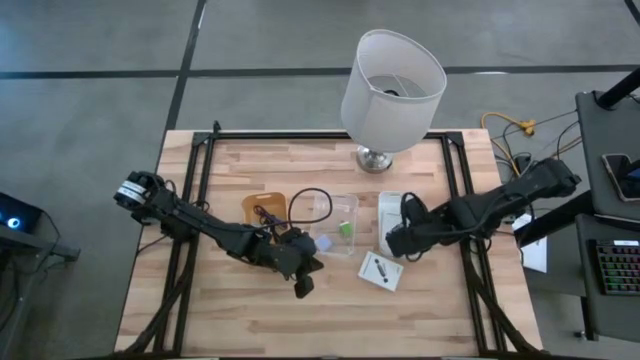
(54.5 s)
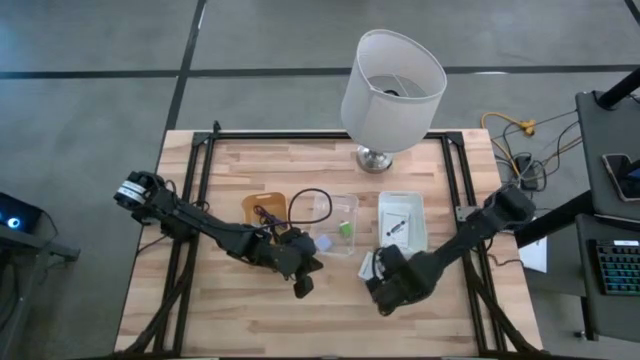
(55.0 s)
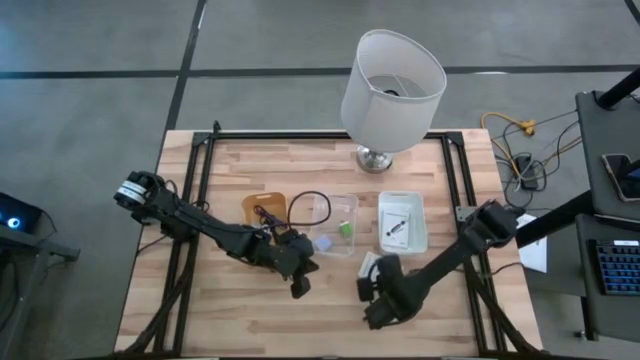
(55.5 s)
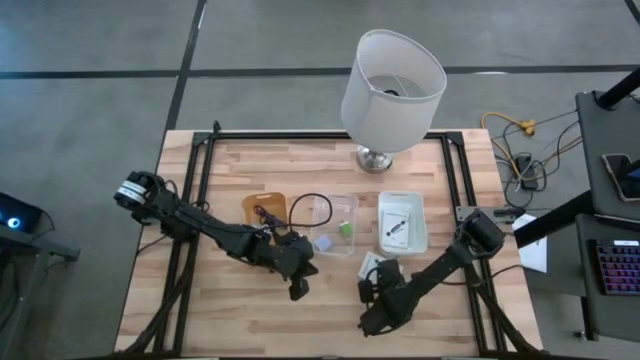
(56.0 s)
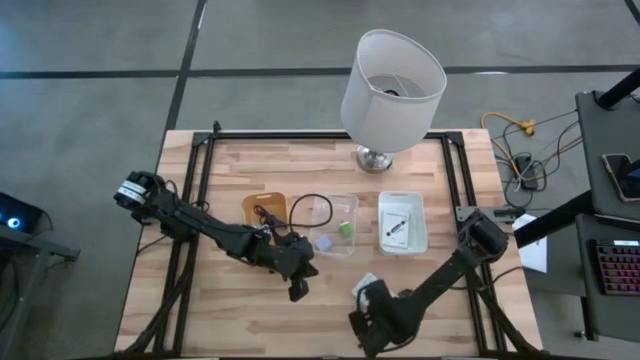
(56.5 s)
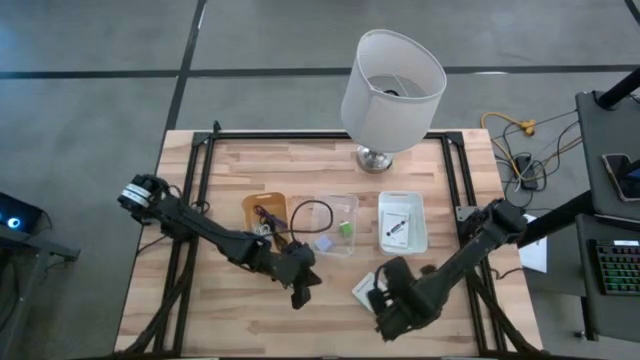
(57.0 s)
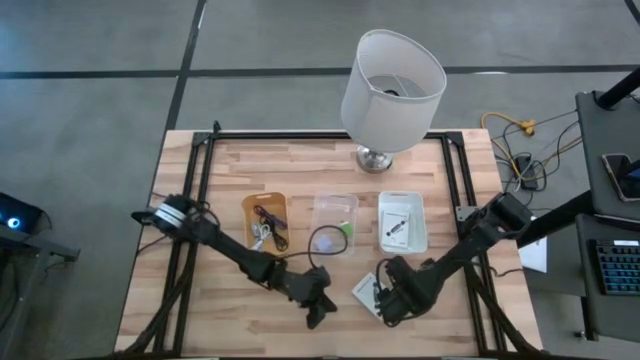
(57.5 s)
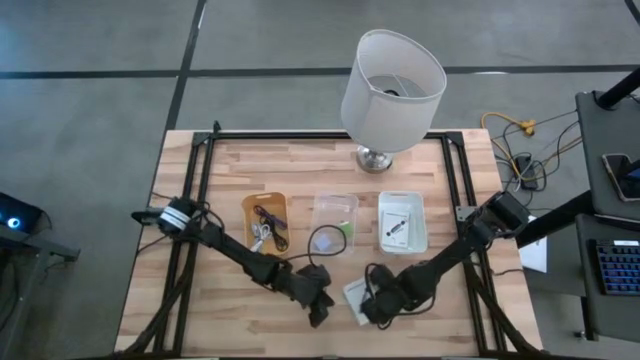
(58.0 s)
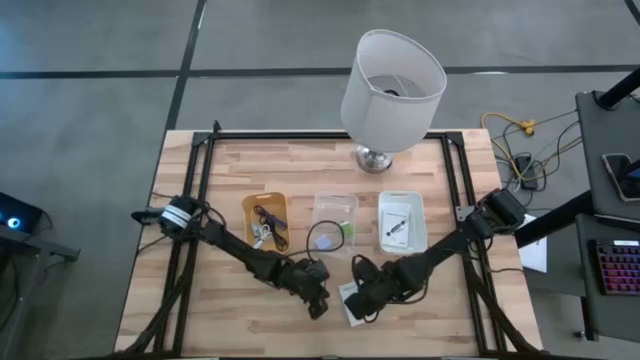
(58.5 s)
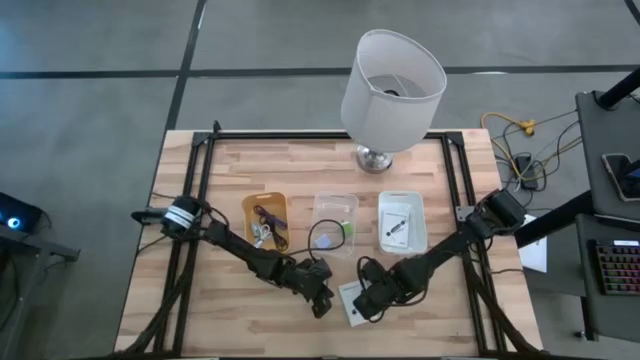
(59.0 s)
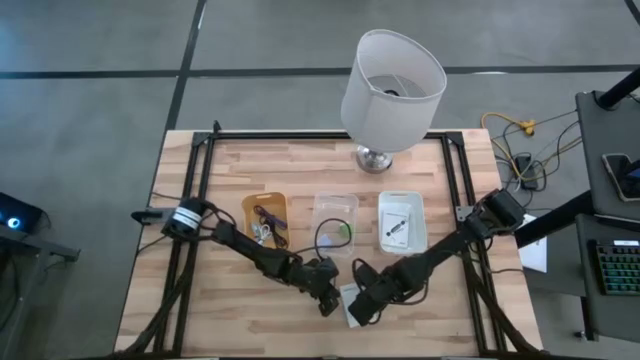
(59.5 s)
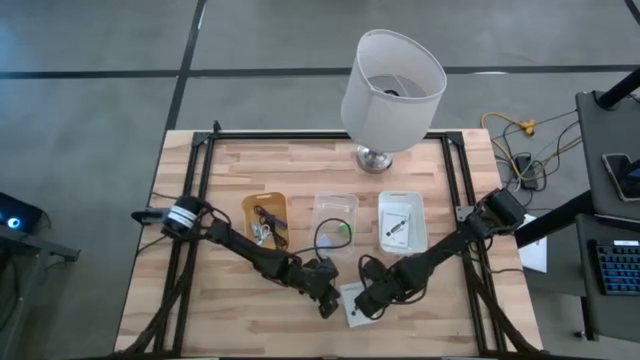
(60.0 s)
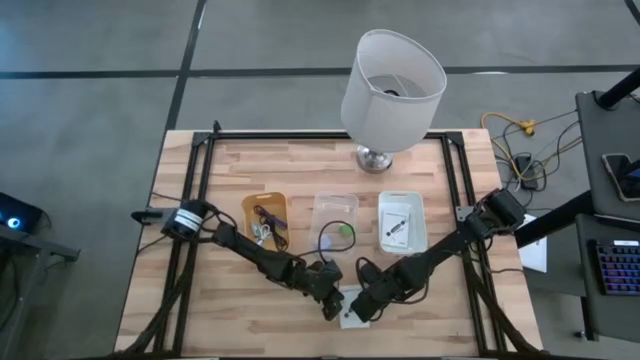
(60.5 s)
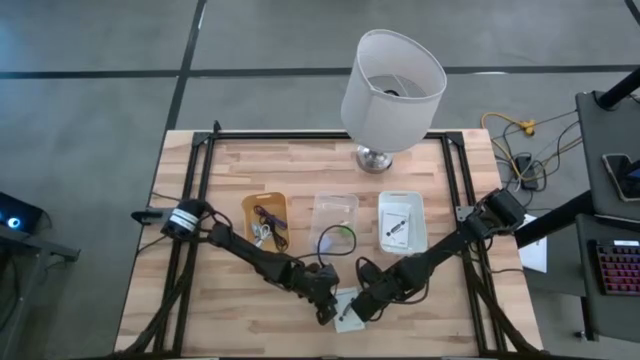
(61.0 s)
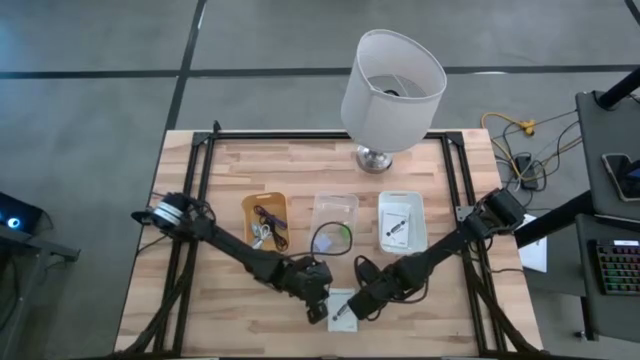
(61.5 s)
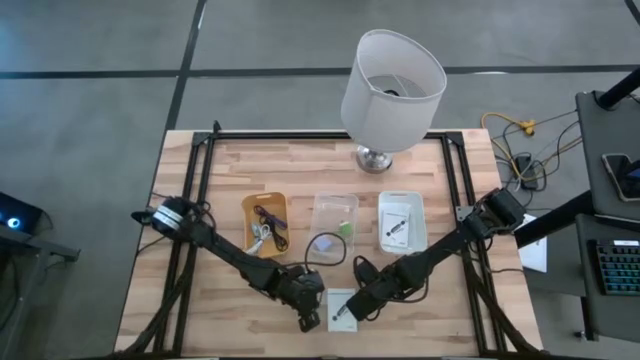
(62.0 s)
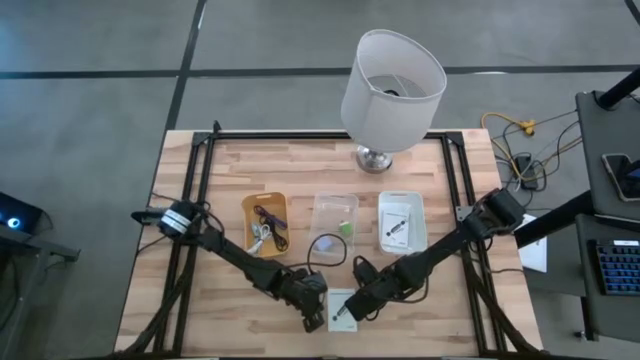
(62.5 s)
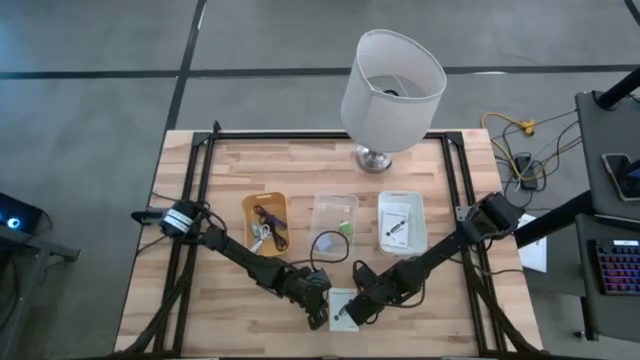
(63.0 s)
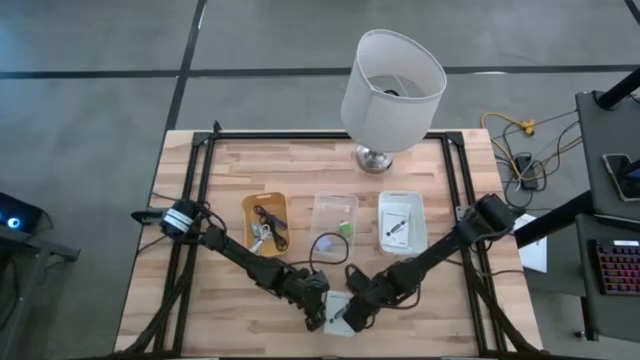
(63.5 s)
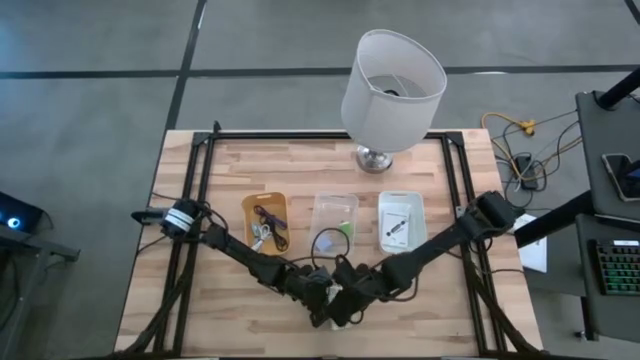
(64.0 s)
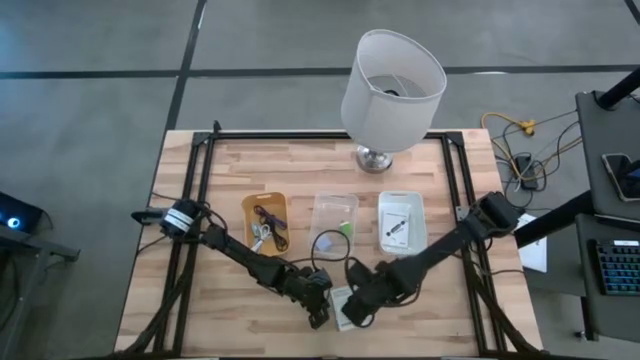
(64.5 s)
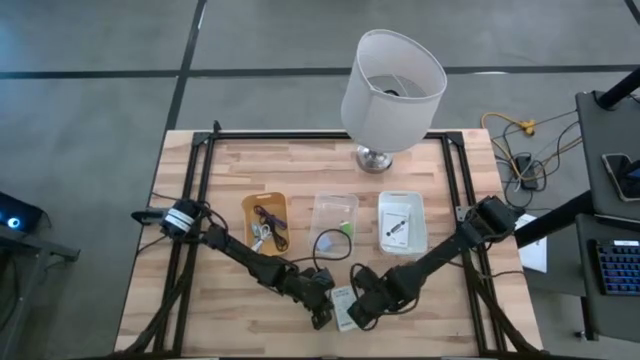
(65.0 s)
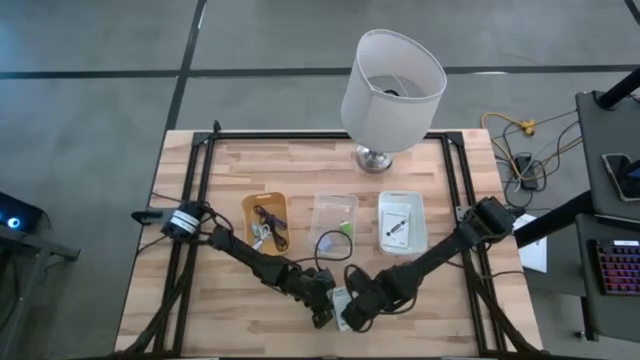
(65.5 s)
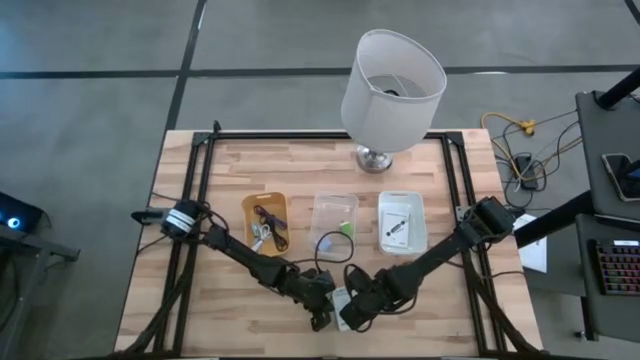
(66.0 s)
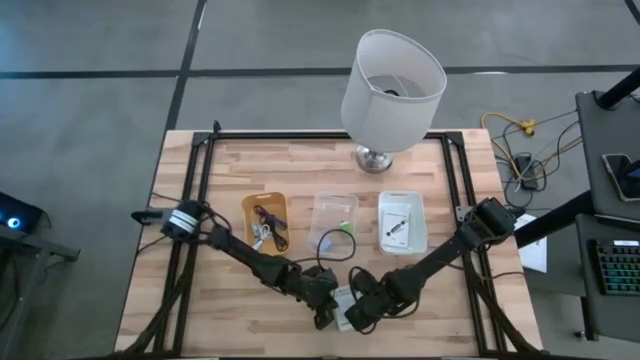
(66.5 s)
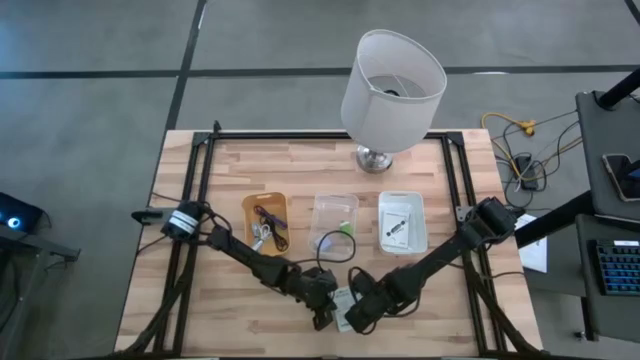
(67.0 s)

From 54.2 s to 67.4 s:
Task: Pick and place items into bin
Put the white card reader box into the white bin

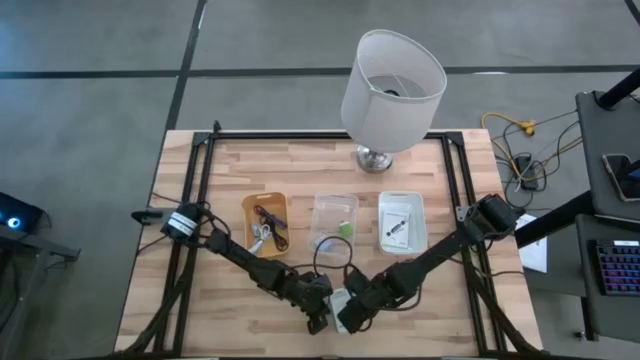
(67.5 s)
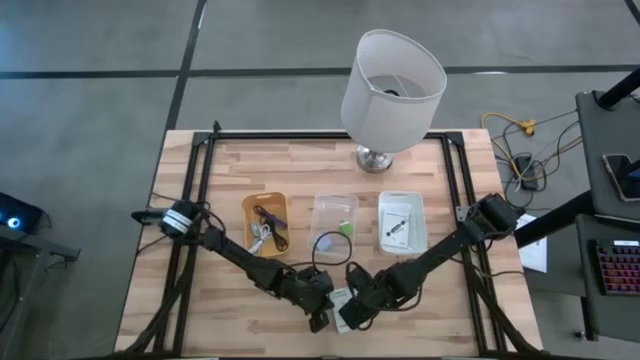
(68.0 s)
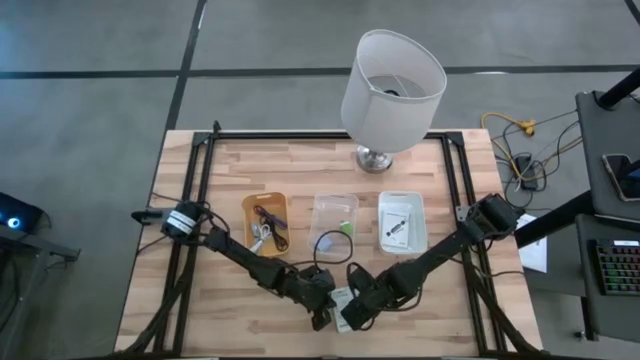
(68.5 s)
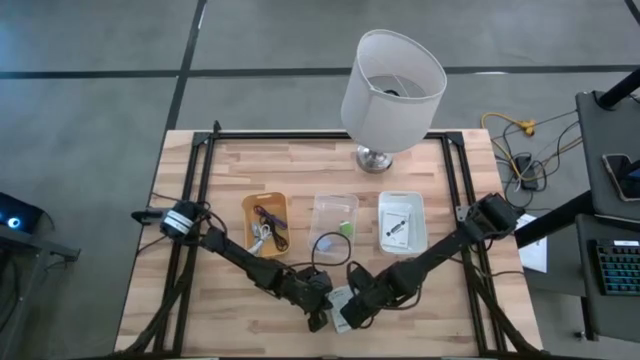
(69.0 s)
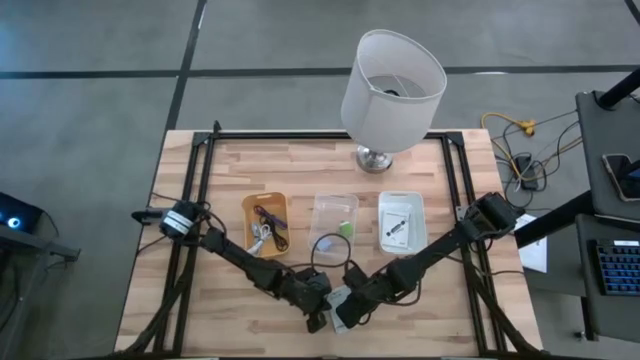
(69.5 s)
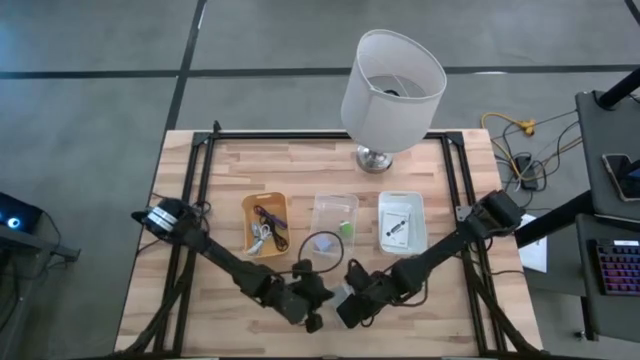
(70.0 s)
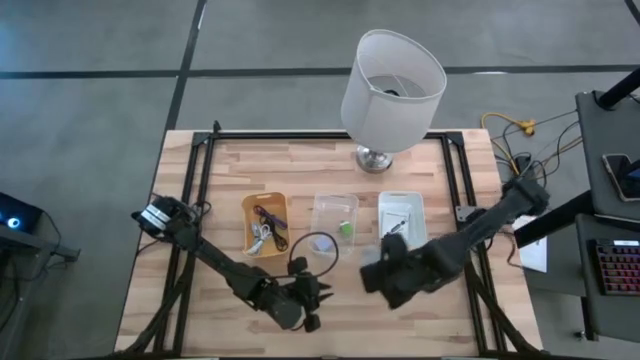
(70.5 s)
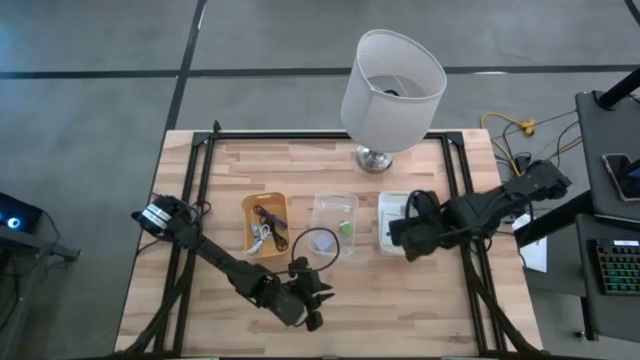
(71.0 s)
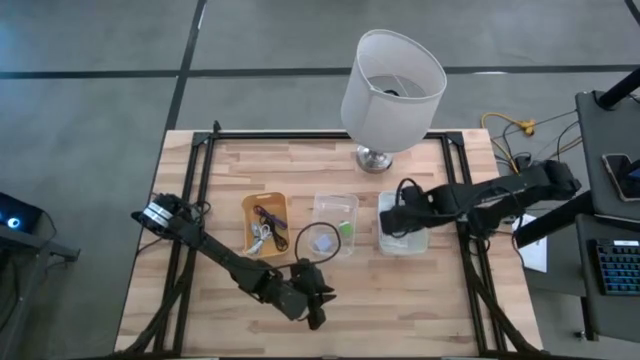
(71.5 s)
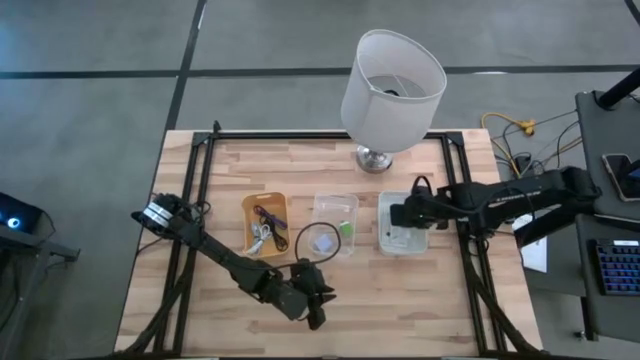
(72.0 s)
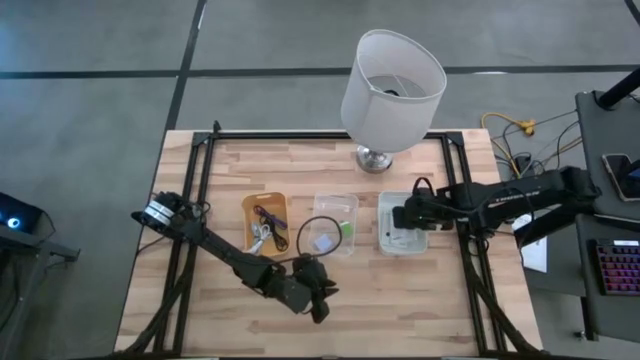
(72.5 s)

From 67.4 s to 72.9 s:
Put the white card reader box into the white bin

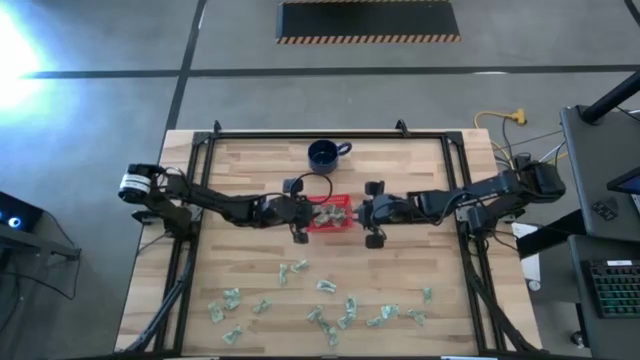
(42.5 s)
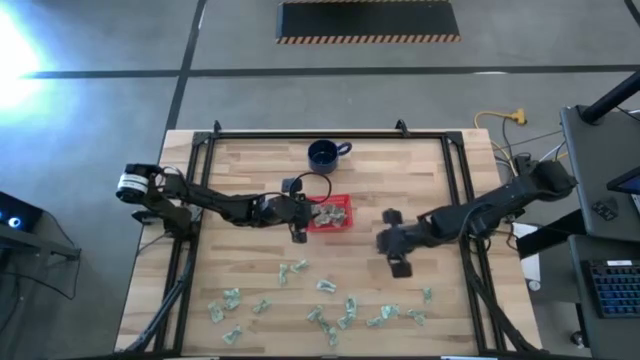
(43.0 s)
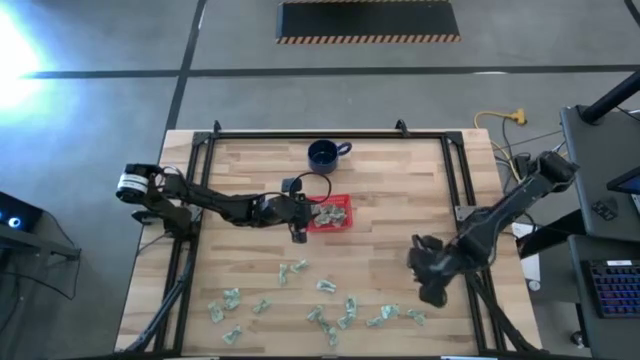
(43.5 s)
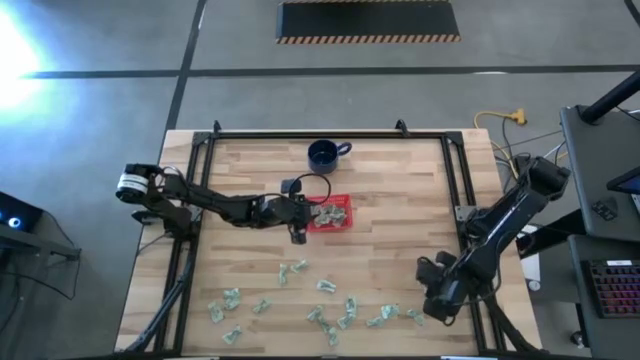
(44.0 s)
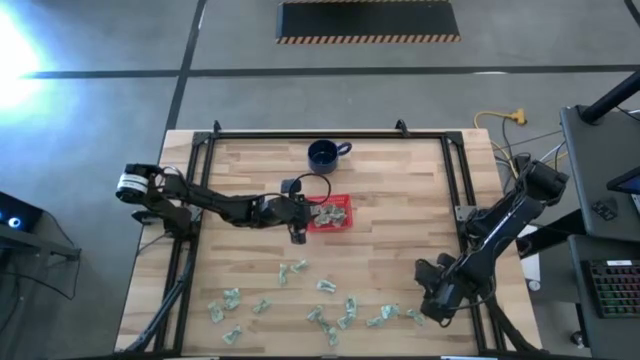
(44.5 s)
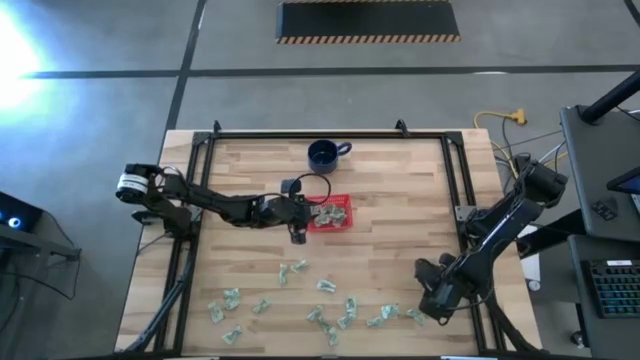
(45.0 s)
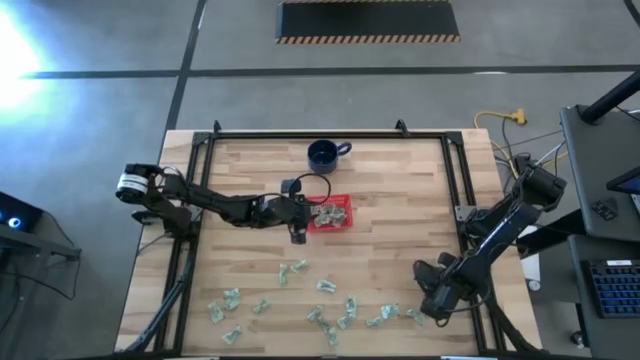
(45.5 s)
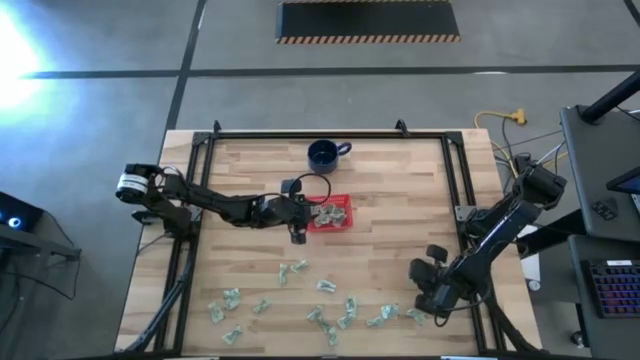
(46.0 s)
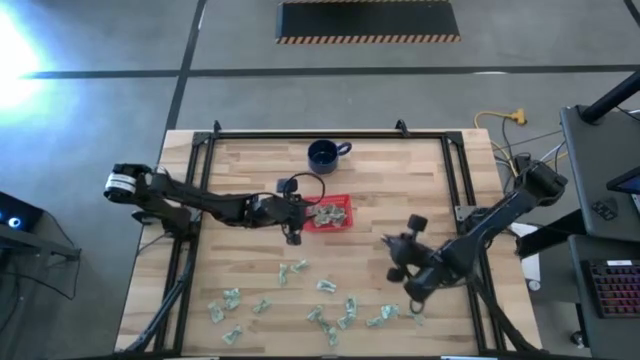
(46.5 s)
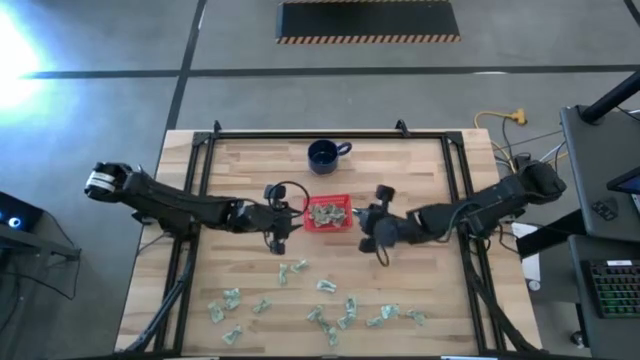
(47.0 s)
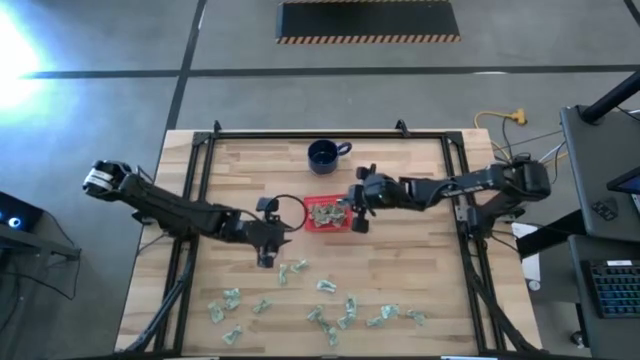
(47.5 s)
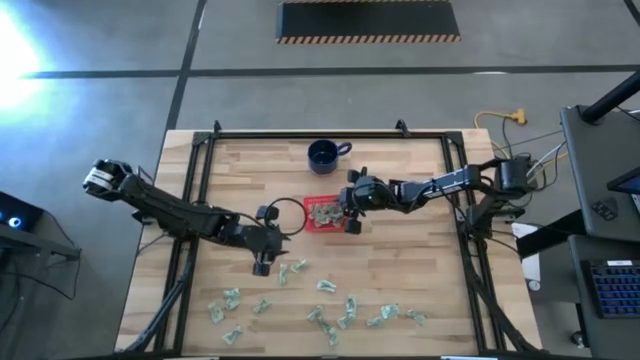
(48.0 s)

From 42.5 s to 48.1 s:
Task: Pick and place items into bin
Put the stevia packet into the red bin
